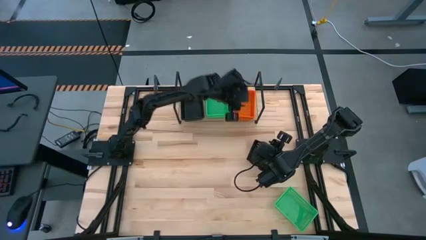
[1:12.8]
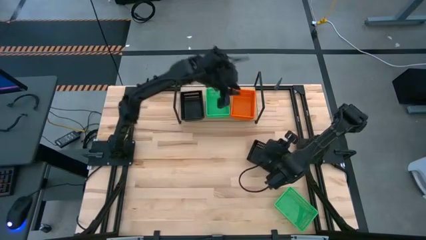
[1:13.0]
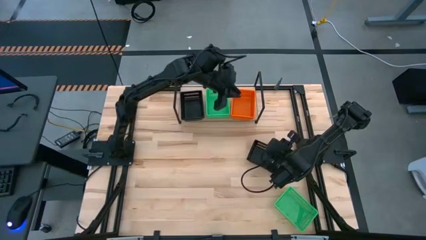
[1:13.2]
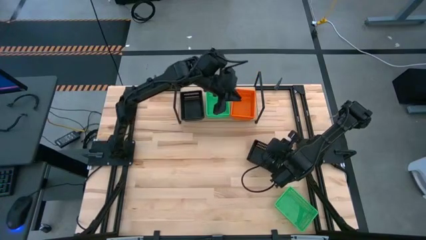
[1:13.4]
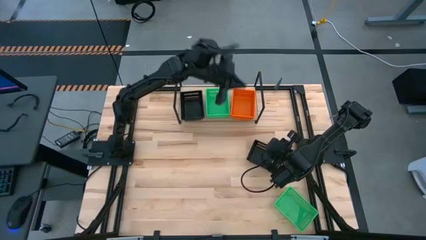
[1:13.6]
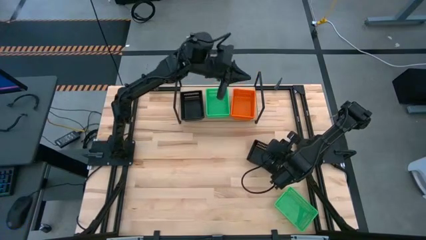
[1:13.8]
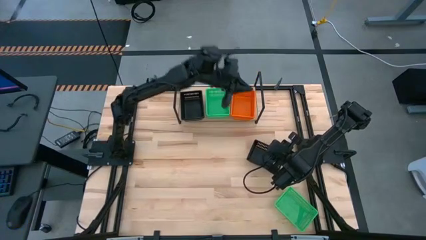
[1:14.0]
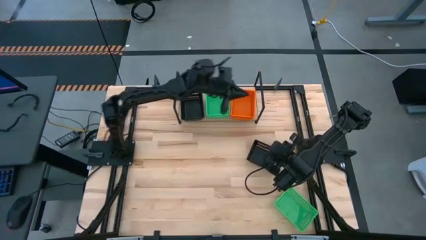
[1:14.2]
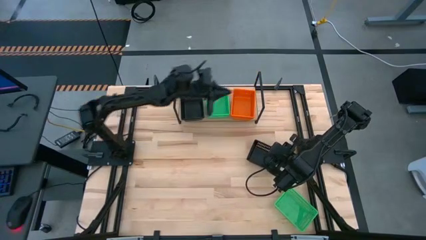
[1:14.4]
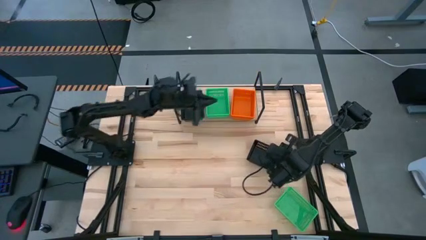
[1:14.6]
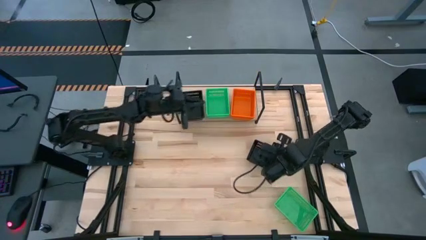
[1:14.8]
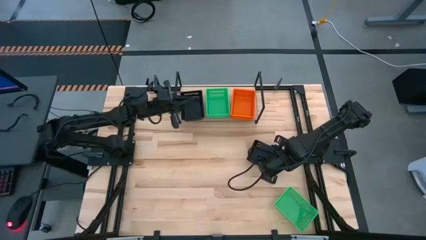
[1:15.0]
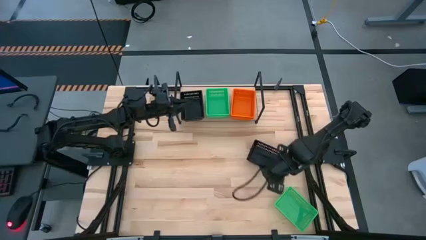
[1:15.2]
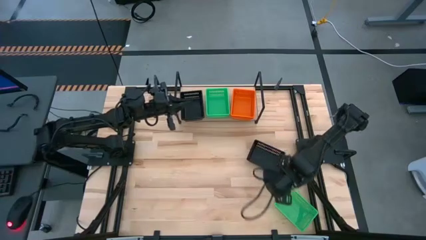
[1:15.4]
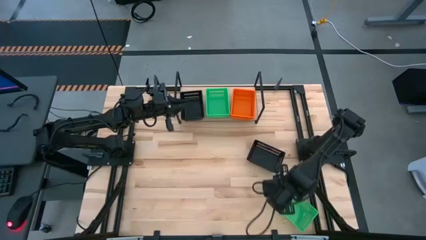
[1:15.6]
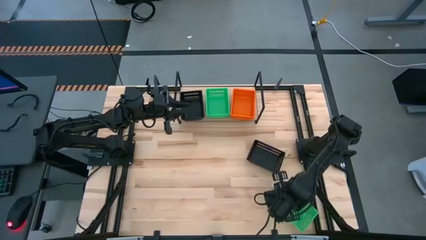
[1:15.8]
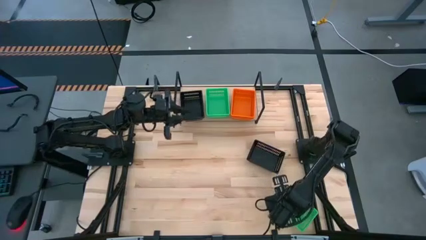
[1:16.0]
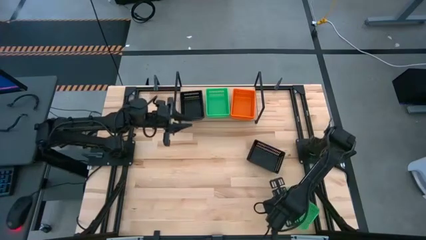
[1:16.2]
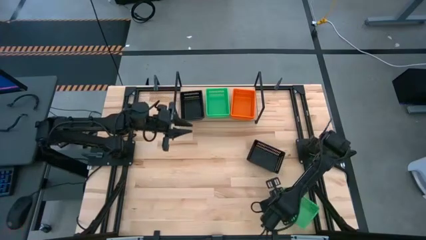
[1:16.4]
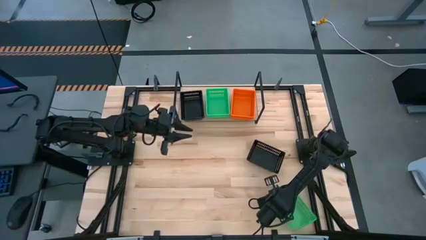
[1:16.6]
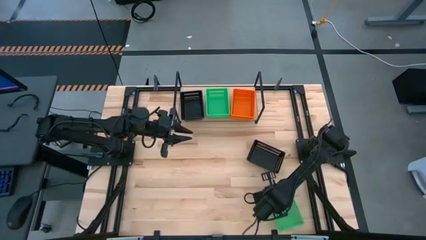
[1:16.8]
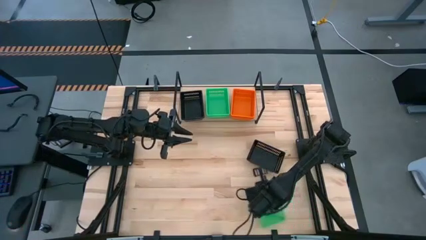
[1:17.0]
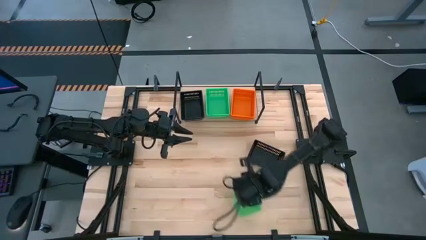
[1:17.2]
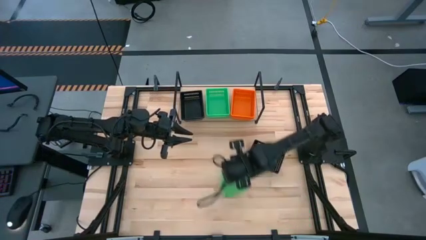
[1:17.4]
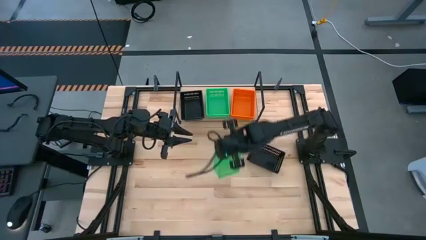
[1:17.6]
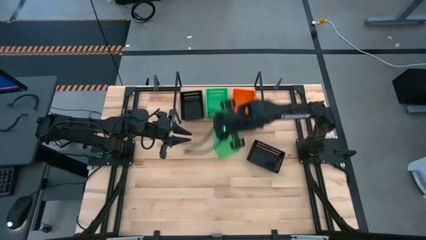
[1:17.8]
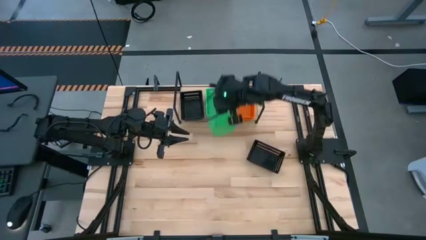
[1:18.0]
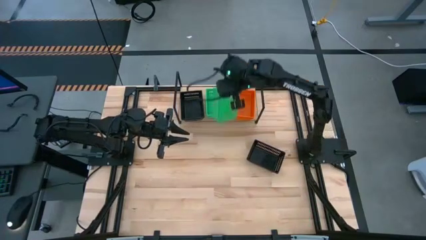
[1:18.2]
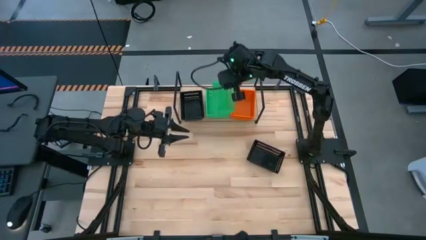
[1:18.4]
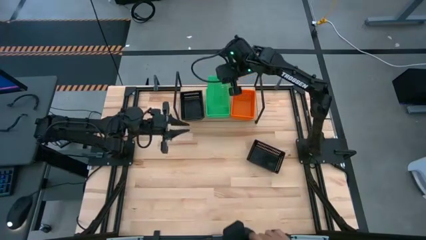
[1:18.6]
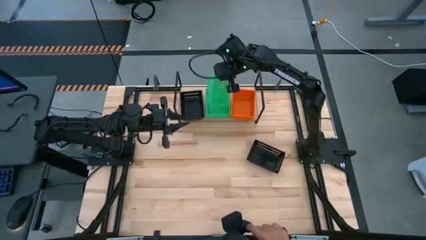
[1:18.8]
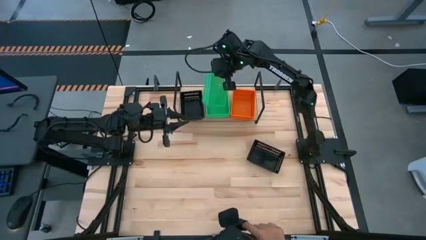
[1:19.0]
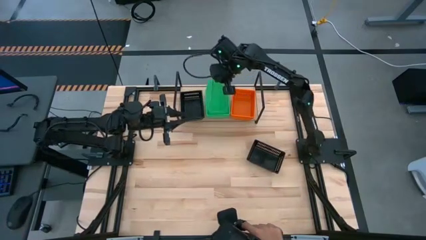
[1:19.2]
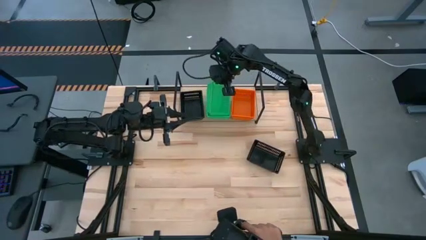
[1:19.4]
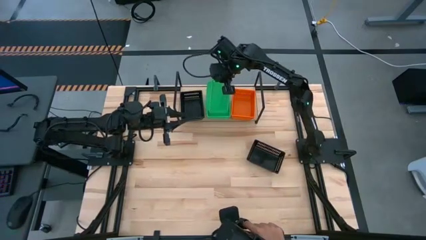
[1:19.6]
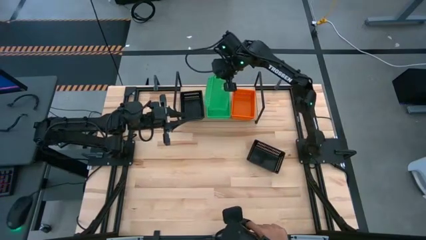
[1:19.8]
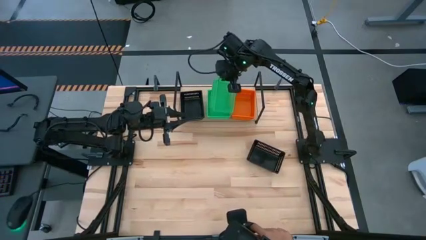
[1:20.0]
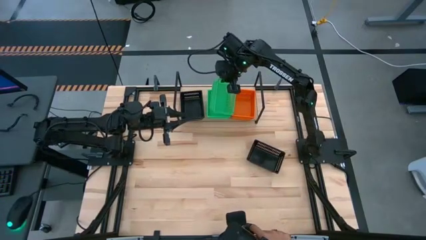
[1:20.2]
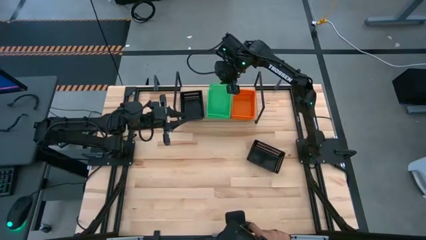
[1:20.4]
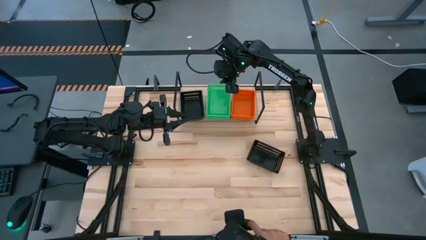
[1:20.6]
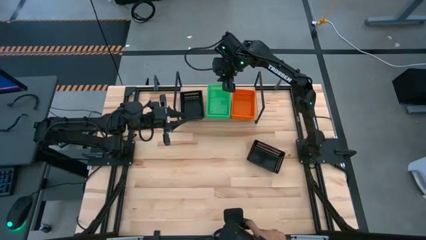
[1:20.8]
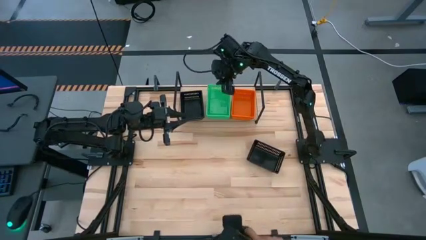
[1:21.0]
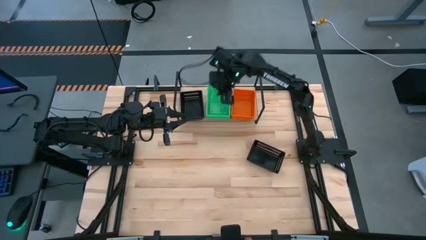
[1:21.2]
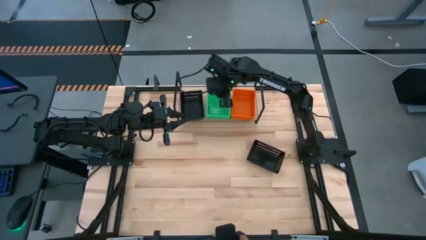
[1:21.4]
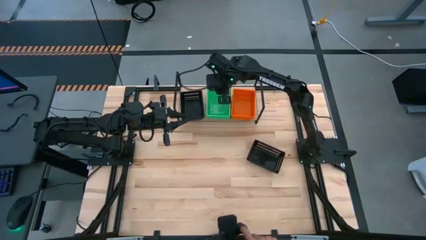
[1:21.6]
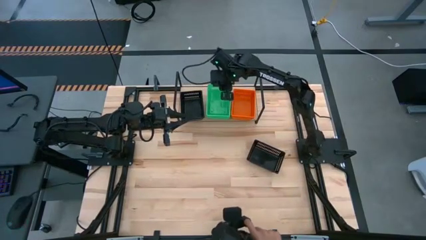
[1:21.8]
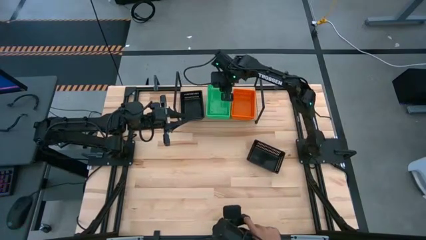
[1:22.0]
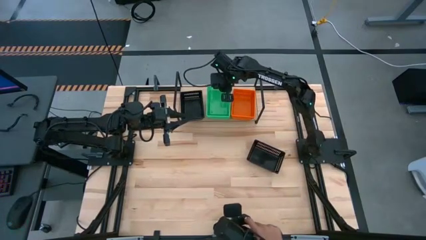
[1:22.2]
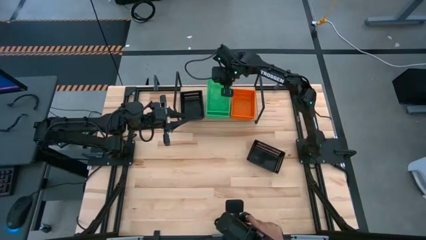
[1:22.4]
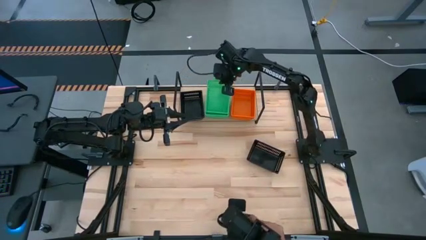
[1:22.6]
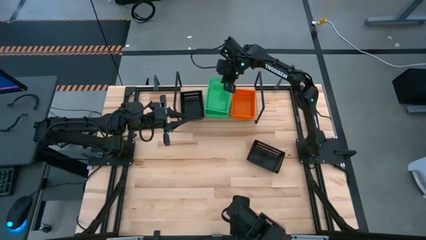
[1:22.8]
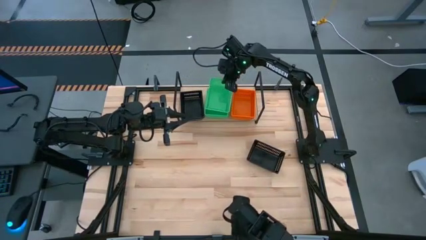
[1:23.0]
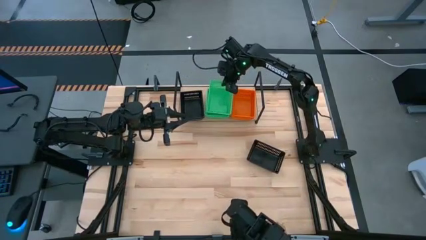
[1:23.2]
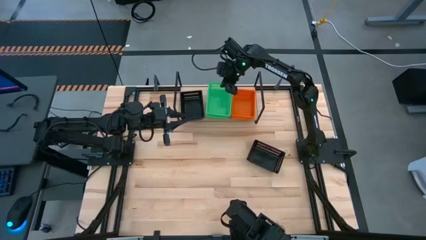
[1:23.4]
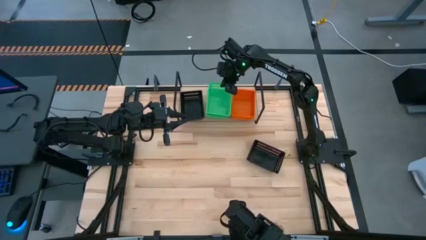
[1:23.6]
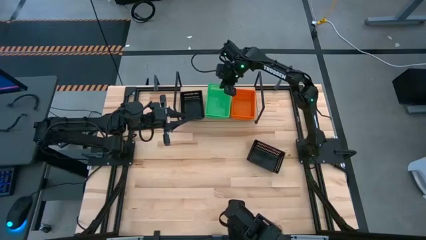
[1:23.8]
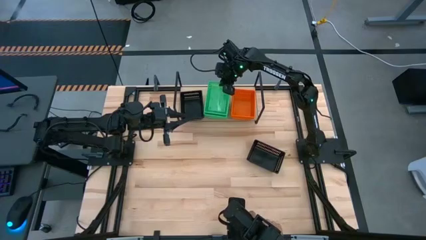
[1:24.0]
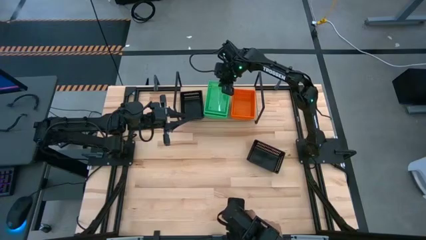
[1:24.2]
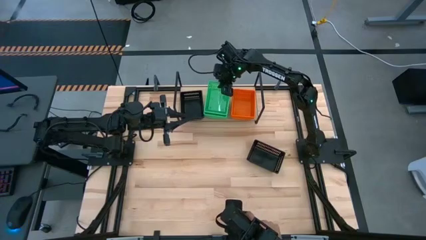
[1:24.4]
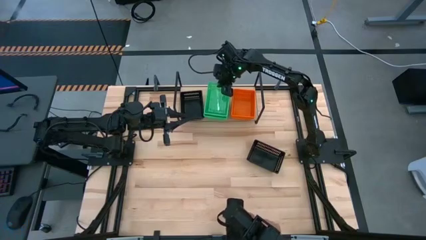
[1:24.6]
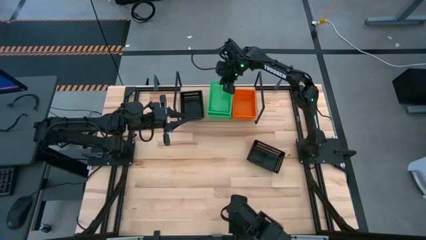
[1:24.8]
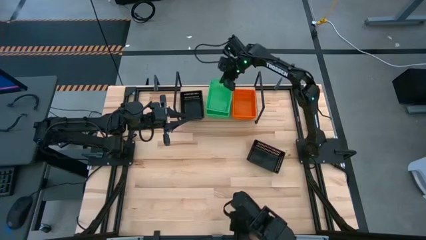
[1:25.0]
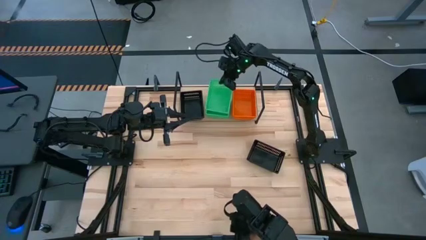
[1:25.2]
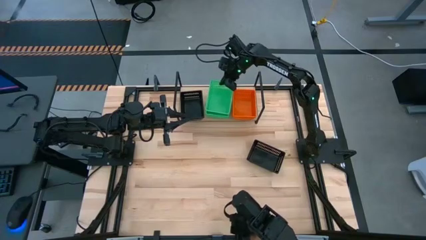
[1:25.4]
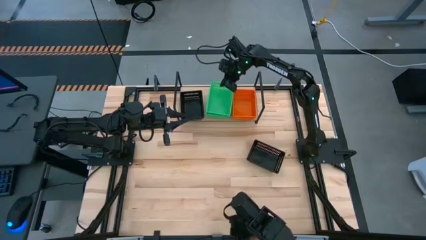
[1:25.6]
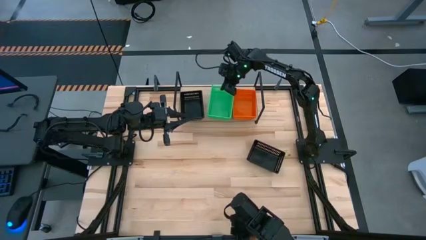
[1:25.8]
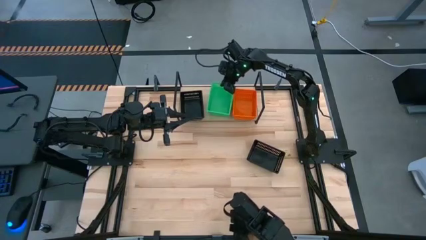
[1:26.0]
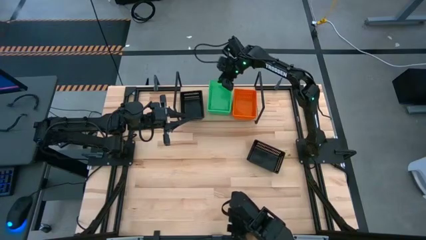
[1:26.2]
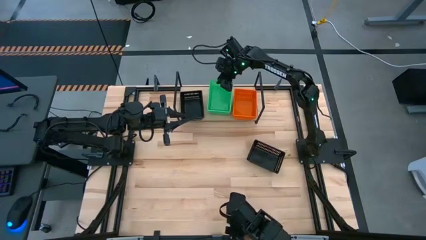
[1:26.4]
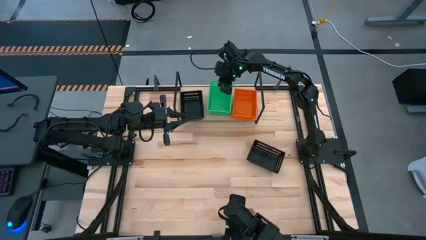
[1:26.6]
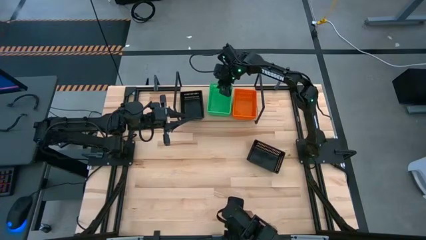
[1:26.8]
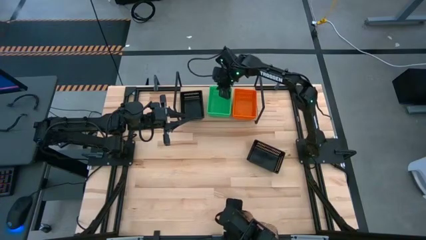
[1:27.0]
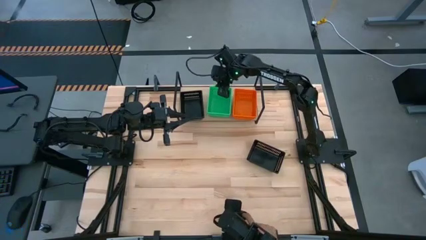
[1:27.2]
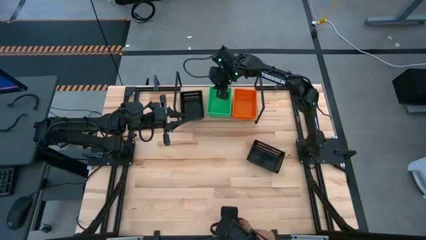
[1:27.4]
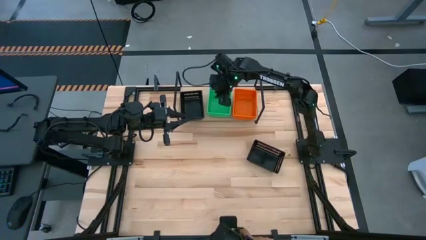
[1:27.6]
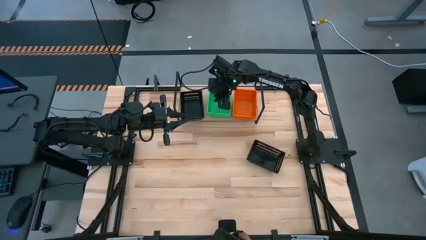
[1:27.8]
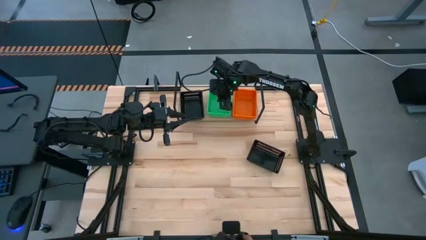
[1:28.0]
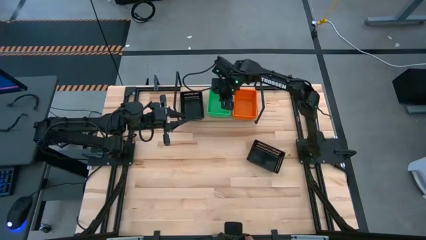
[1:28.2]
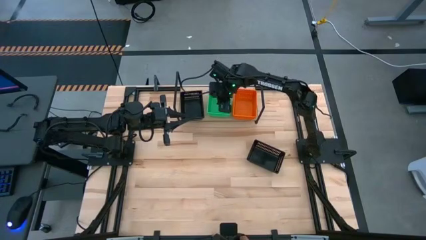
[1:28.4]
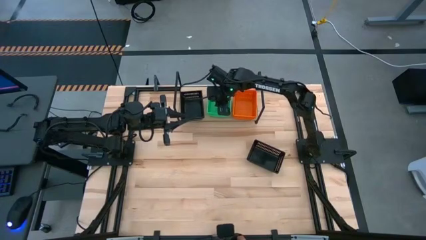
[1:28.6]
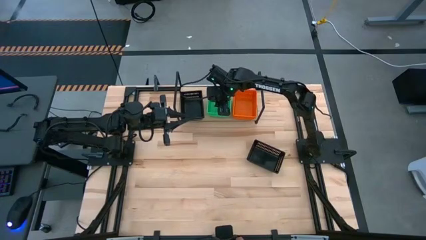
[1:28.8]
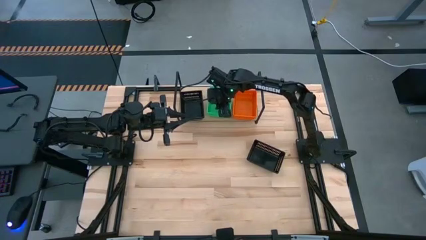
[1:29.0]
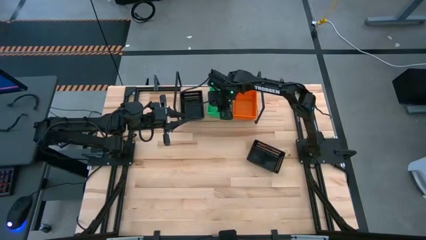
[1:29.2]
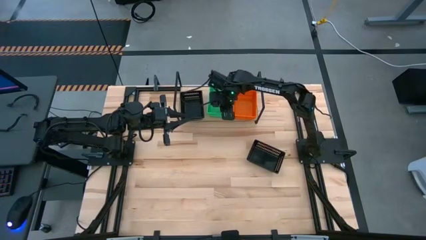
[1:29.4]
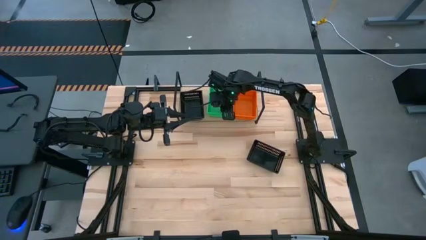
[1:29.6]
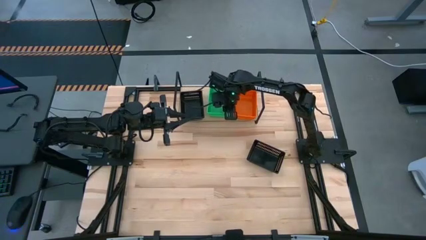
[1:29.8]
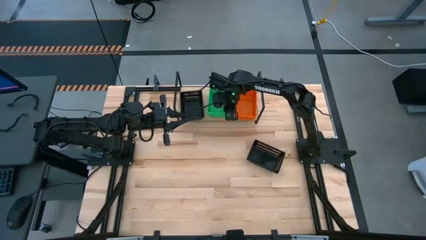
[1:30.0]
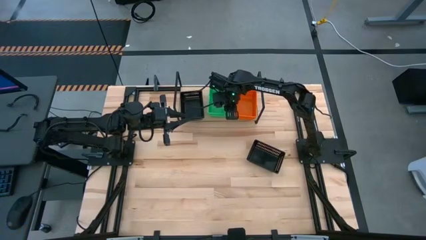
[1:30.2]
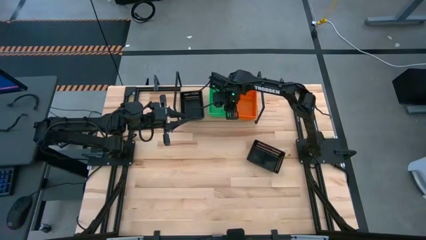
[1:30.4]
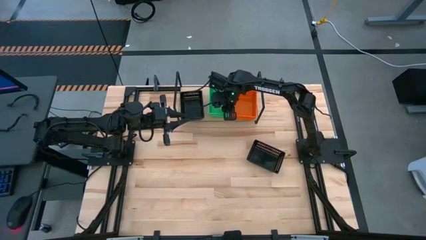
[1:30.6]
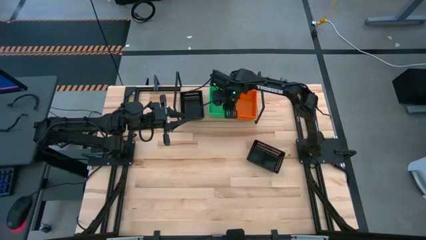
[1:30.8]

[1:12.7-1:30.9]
Task: Stack baskets on shelf by color
Stack the green bin on the green bin on the shelf
